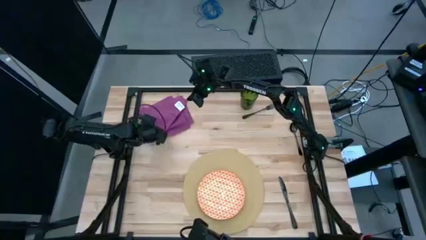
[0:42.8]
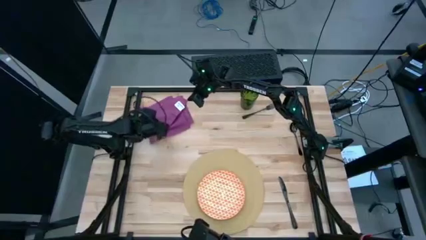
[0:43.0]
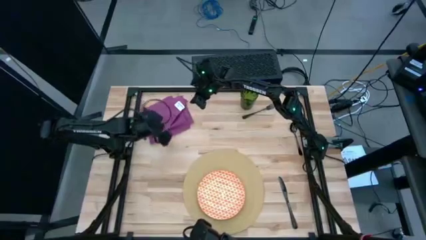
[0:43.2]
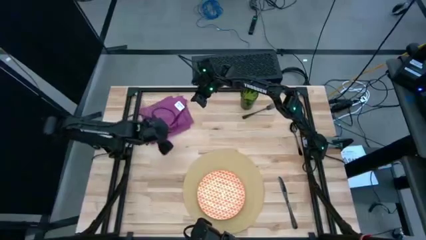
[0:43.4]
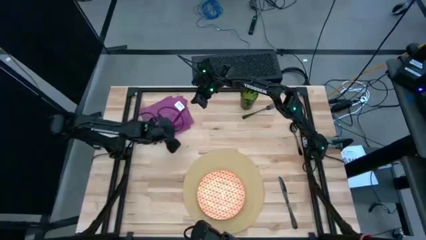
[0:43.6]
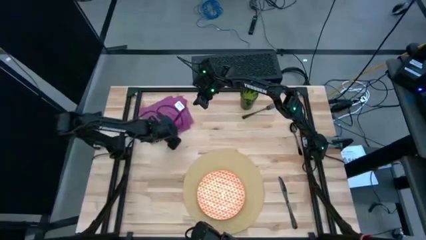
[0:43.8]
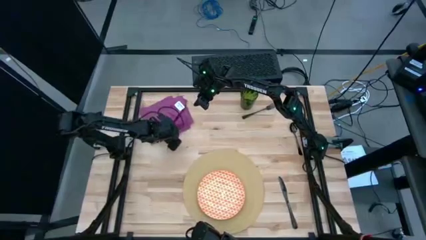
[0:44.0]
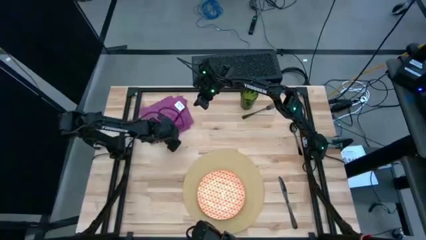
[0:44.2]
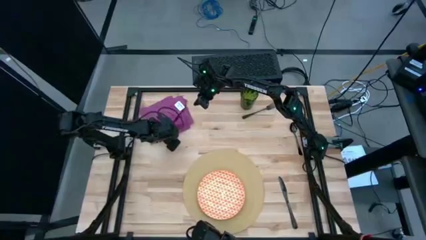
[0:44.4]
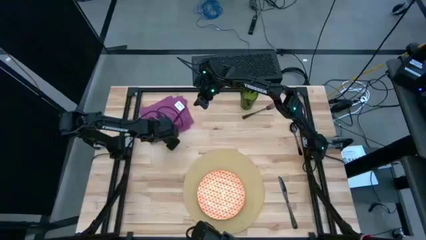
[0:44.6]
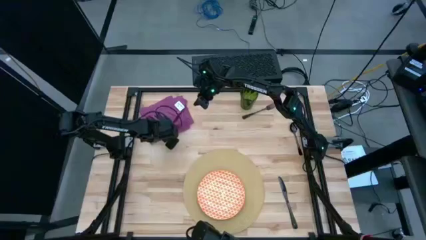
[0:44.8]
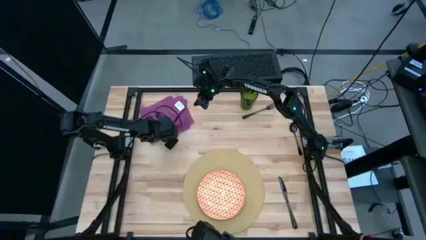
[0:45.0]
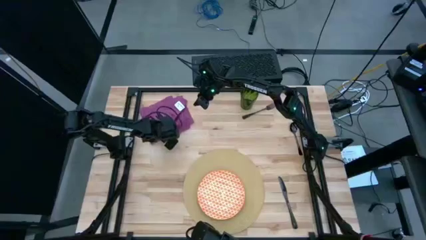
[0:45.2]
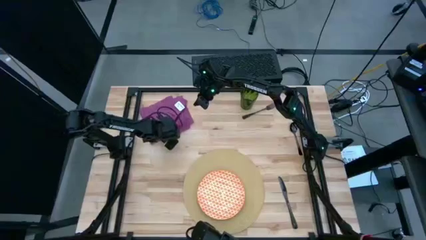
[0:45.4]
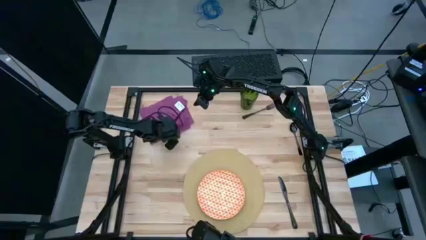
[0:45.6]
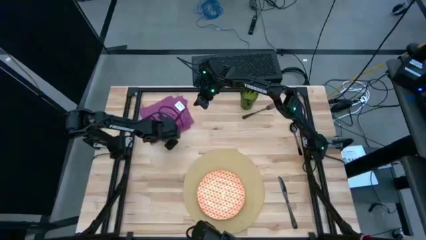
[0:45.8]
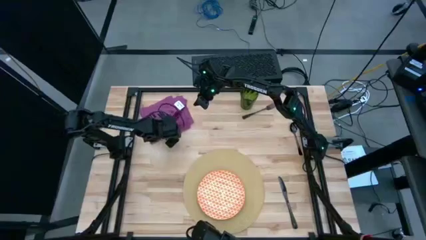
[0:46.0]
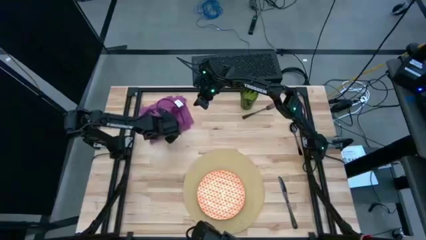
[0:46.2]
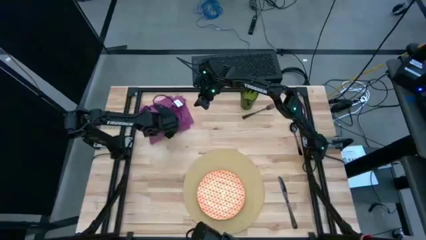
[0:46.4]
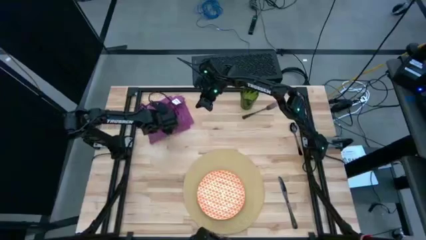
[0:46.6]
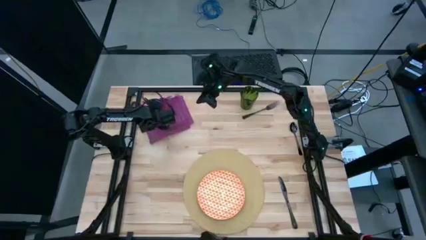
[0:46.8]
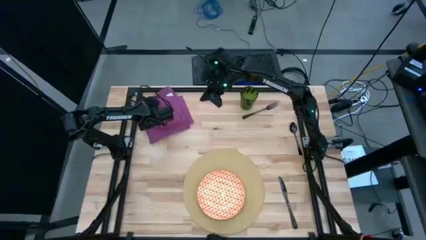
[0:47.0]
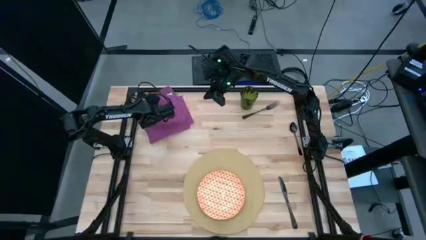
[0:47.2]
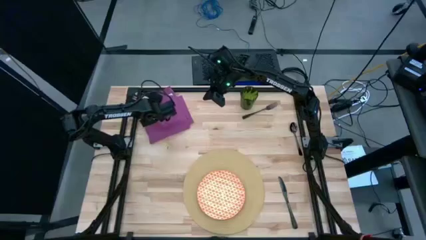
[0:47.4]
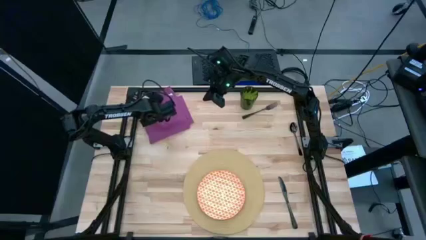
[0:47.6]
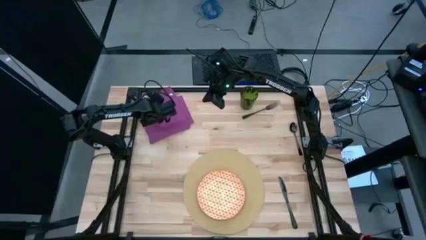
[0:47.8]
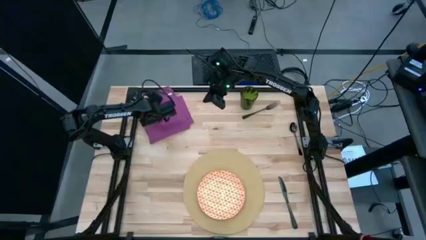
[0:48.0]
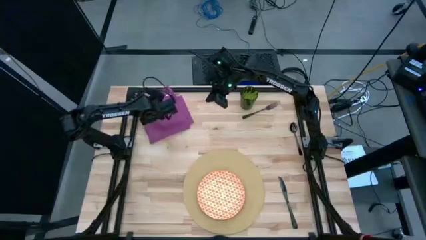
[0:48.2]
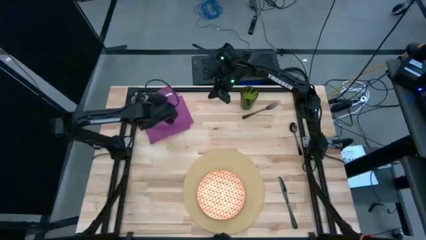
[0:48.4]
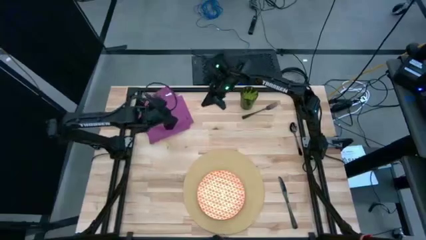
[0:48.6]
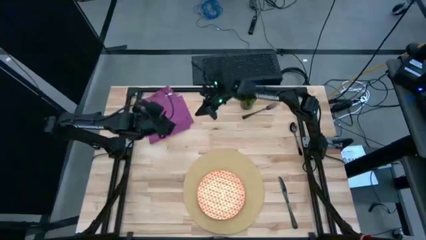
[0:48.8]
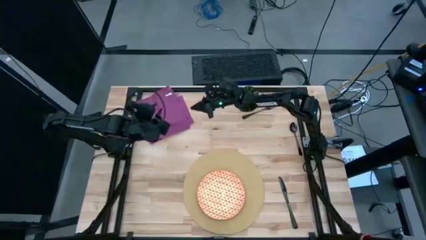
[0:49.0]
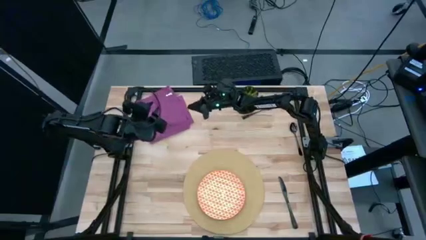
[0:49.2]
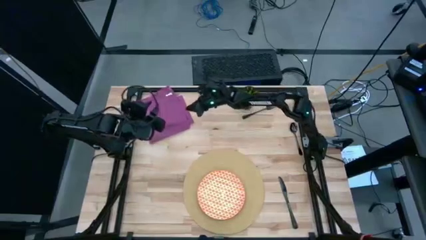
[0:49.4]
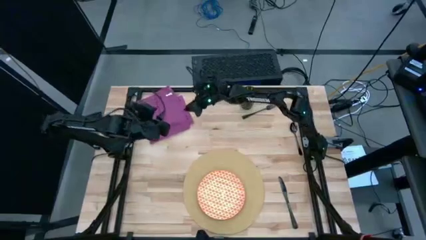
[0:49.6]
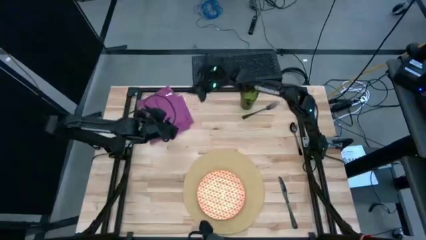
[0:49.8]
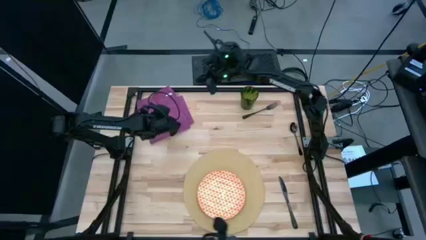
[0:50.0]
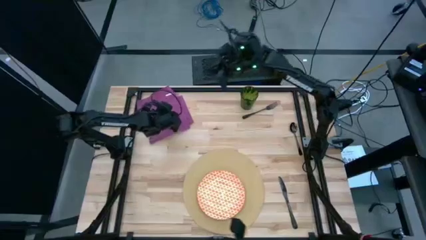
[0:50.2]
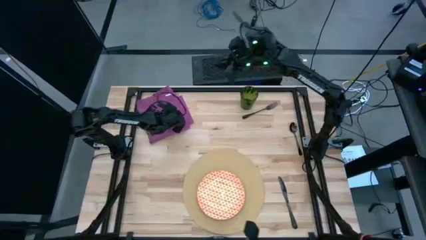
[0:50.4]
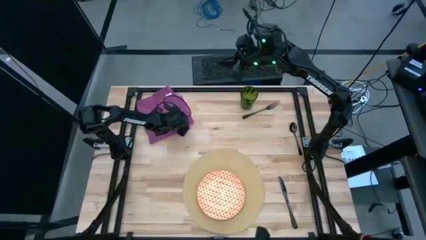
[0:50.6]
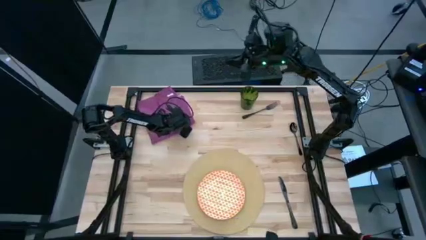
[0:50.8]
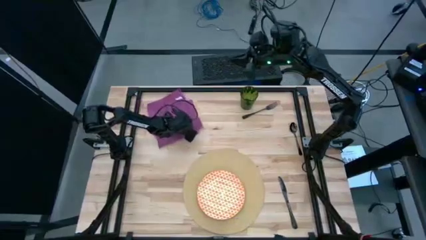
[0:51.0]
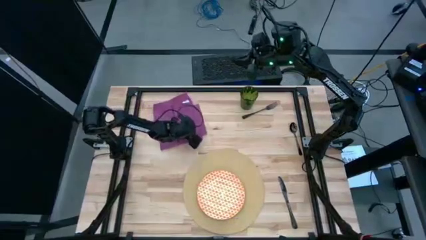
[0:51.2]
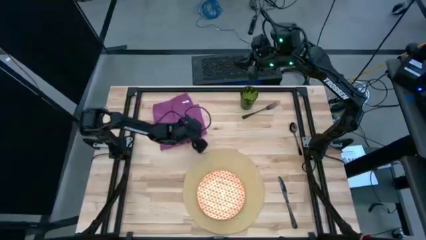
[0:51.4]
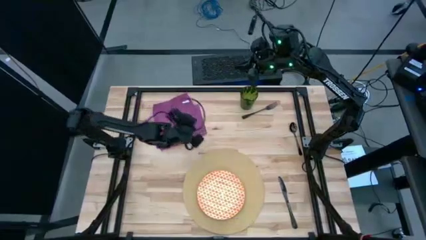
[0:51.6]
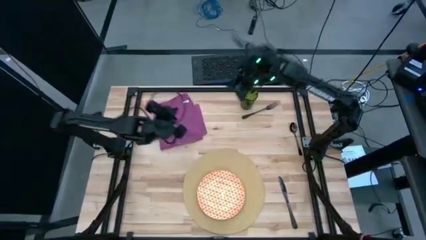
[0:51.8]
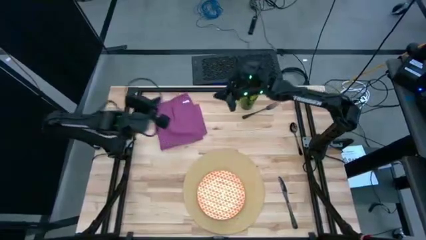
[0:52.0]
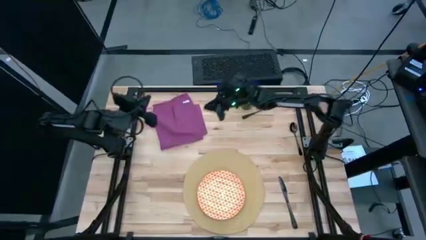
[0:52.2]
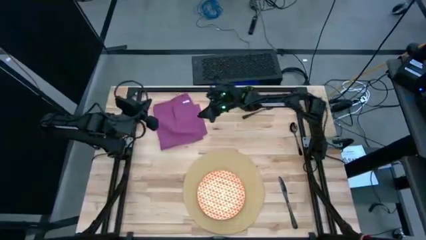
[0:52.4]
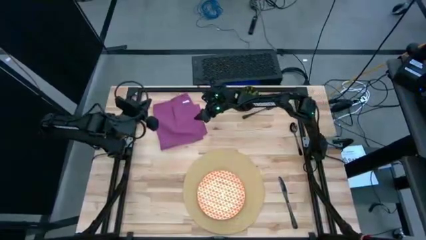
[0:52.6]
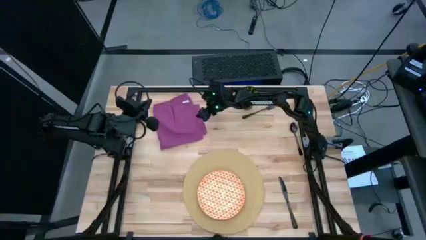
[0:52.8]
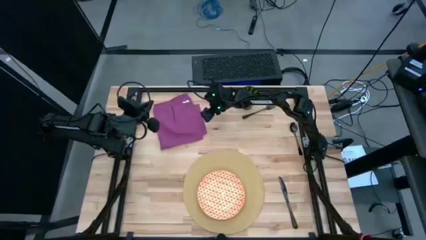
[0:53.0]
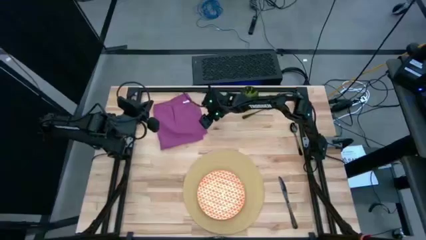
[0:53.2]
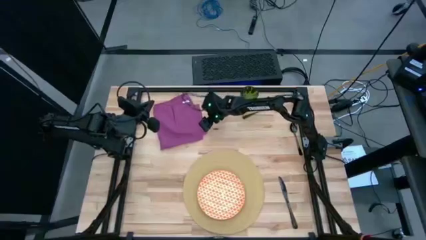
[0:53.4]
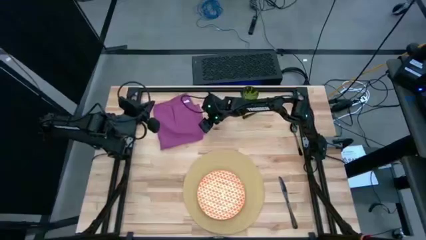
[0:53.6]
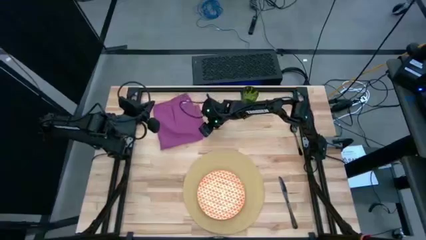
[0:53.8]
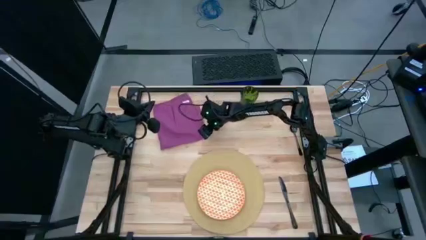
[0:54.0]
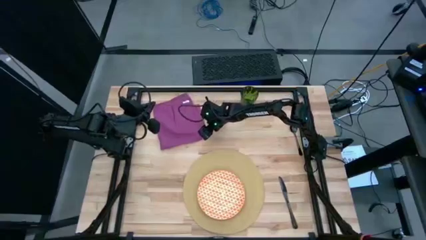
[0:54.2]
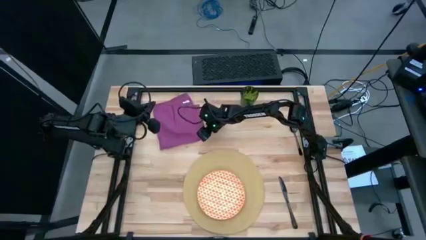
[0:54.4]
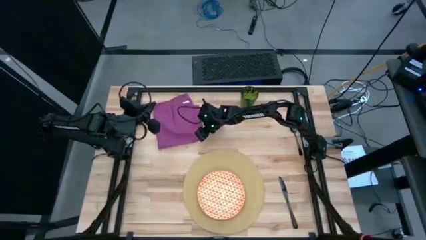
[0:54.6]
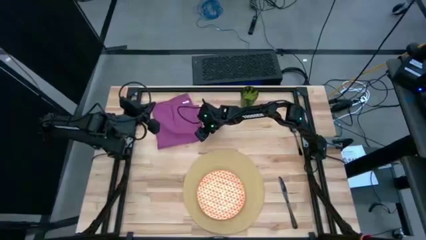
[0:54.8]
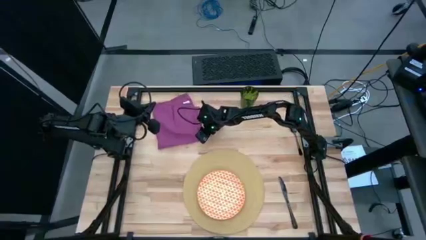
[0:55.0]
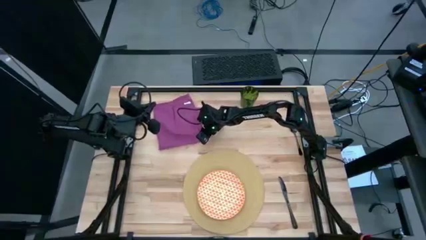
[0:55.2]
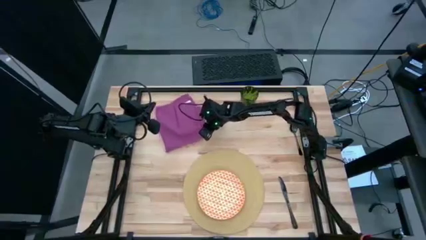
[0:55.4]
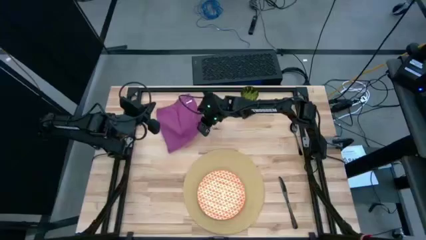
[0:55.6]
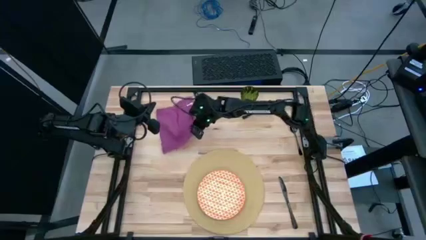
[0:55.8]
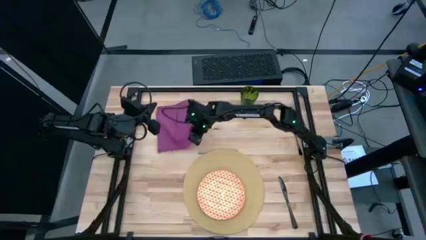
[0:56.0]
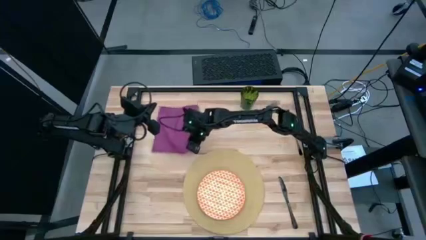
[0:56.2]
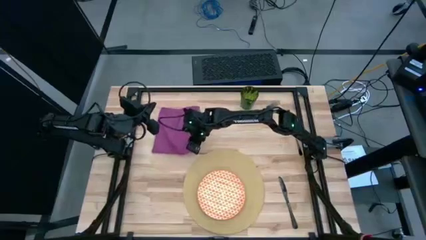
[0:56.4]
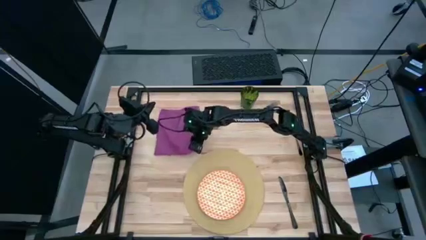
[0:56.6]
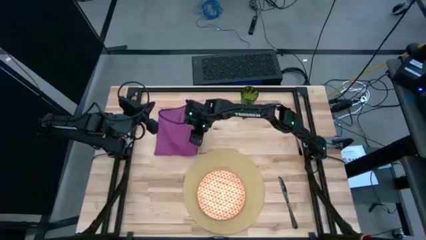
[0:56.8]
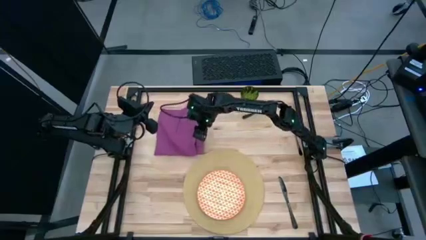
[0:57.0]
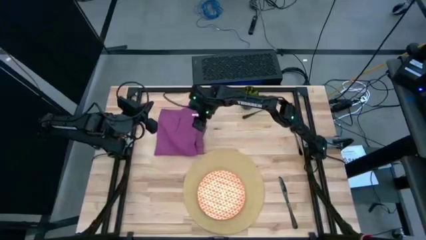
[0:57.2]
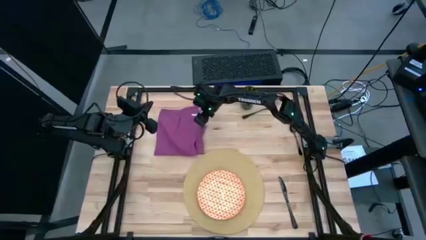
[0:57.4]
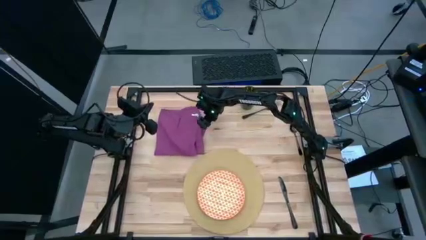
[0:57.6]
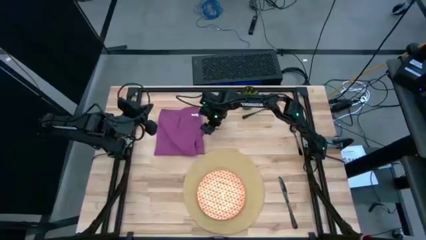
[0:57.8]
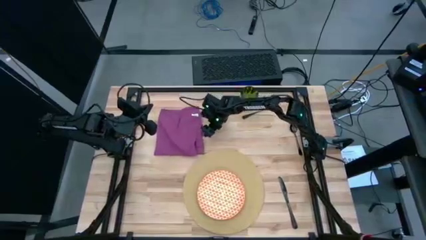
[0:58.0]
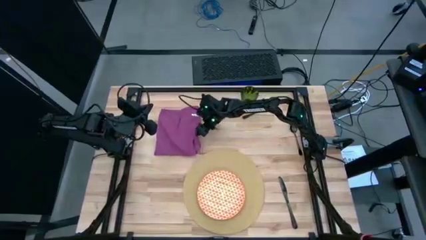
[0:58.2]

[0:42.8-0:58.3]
Task: Set table place
Fold the purple table napkin
